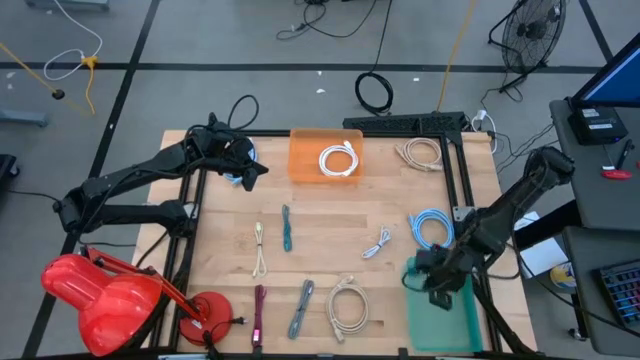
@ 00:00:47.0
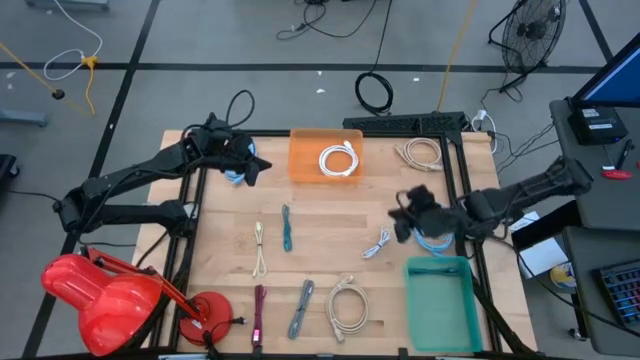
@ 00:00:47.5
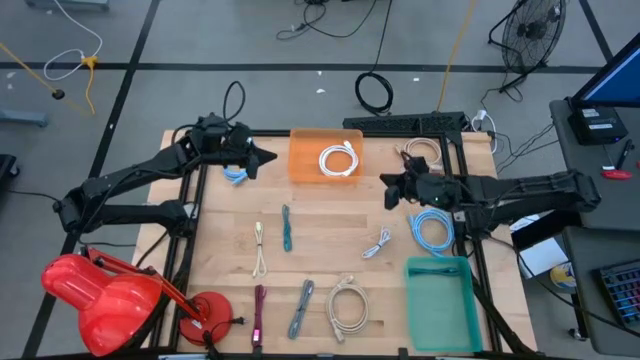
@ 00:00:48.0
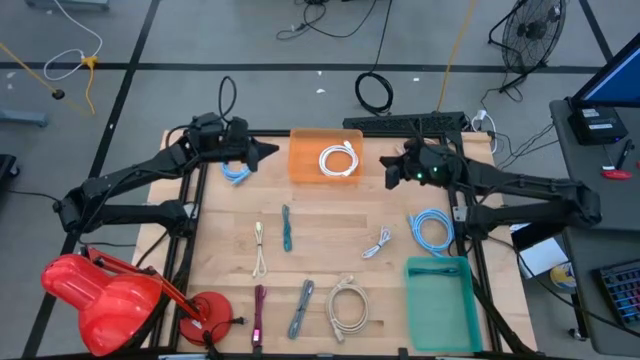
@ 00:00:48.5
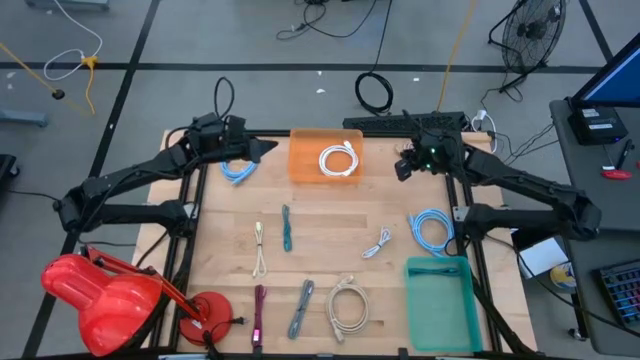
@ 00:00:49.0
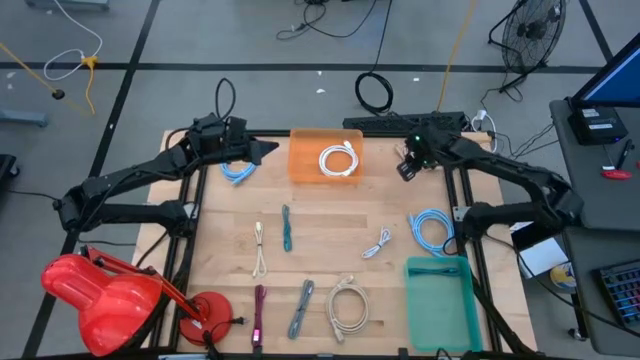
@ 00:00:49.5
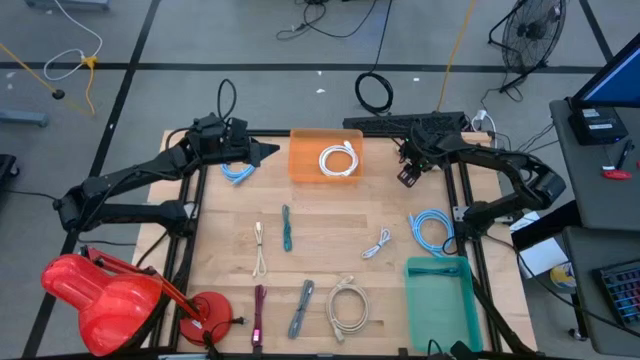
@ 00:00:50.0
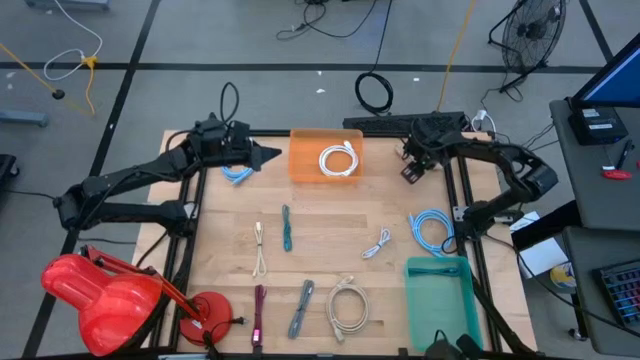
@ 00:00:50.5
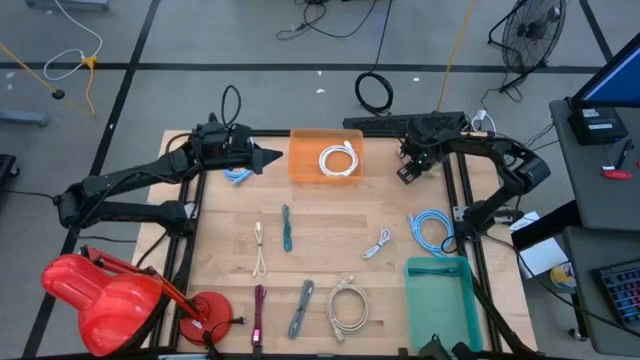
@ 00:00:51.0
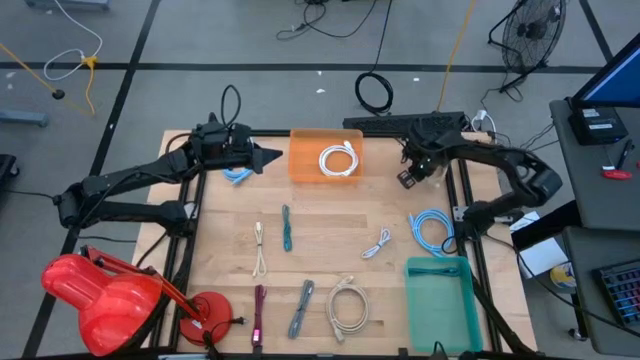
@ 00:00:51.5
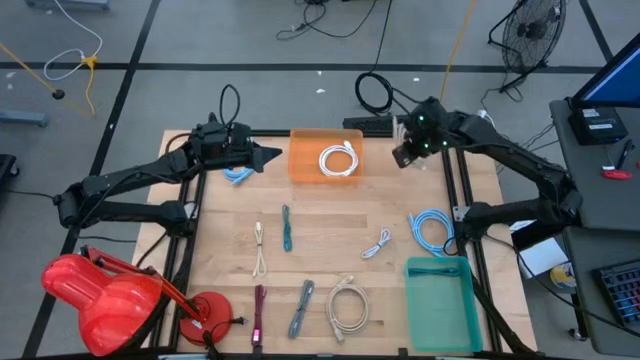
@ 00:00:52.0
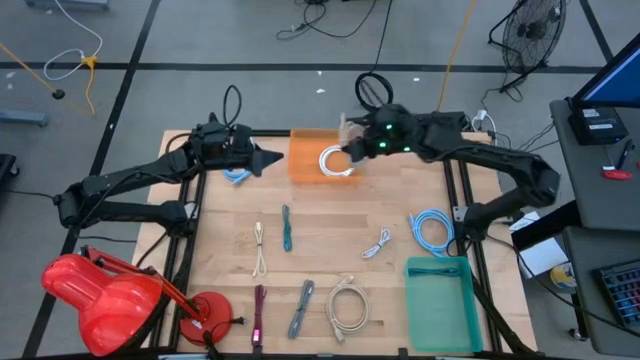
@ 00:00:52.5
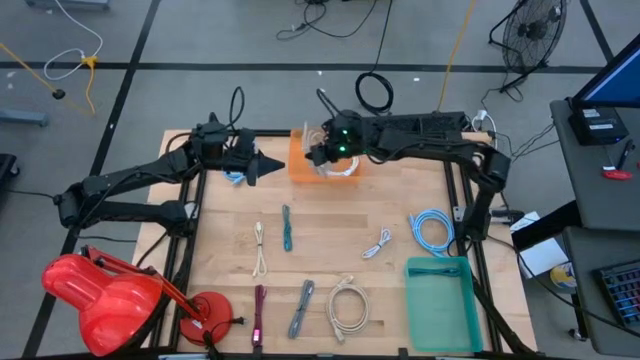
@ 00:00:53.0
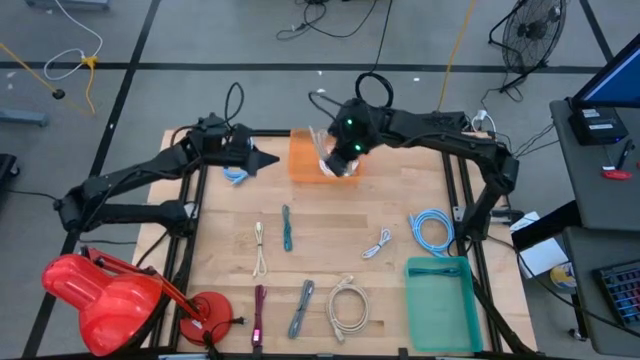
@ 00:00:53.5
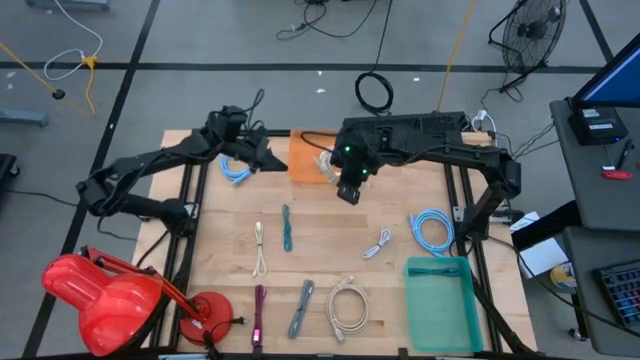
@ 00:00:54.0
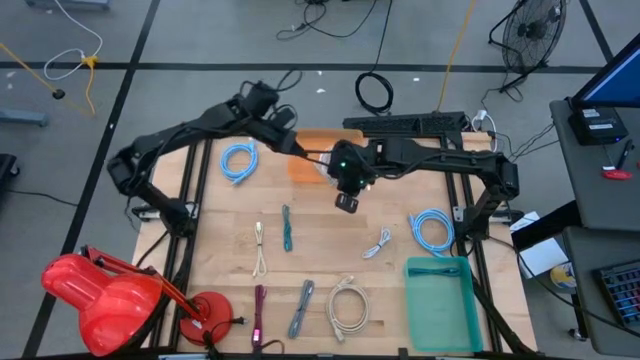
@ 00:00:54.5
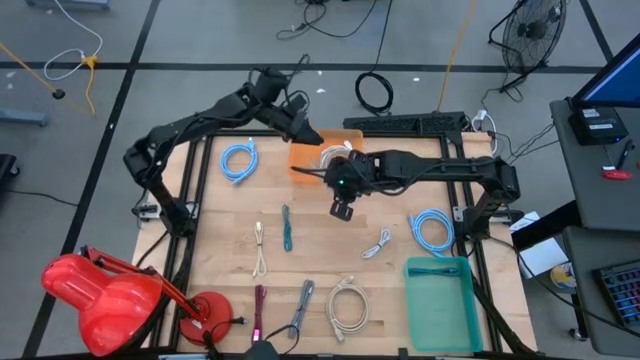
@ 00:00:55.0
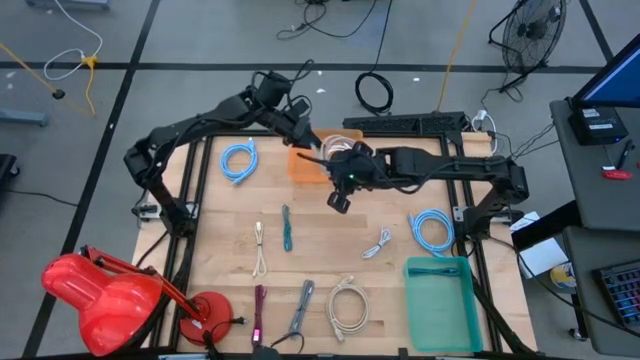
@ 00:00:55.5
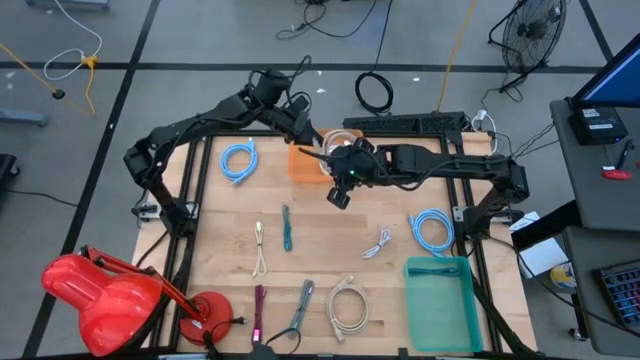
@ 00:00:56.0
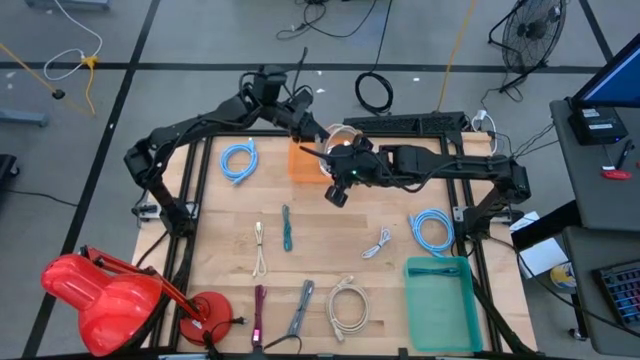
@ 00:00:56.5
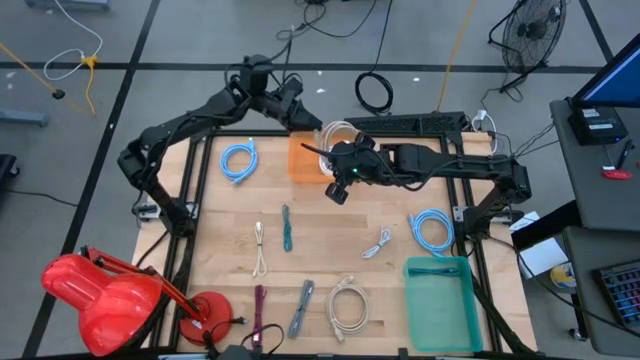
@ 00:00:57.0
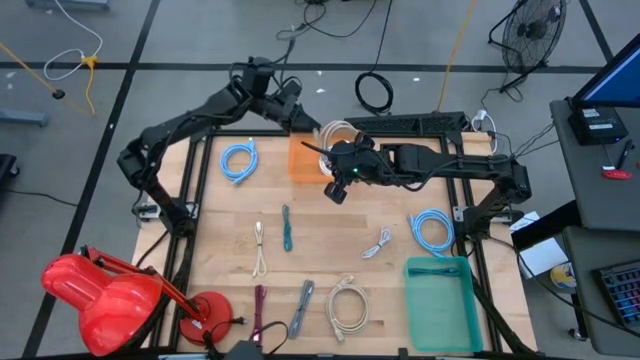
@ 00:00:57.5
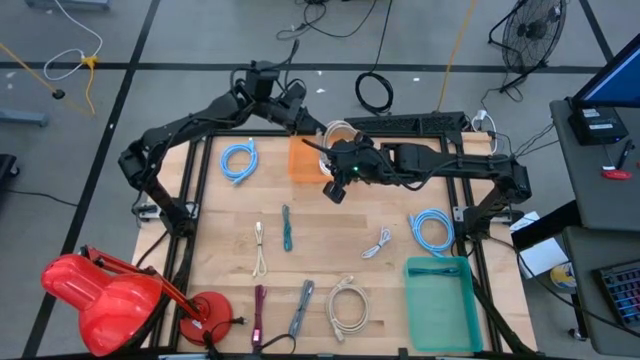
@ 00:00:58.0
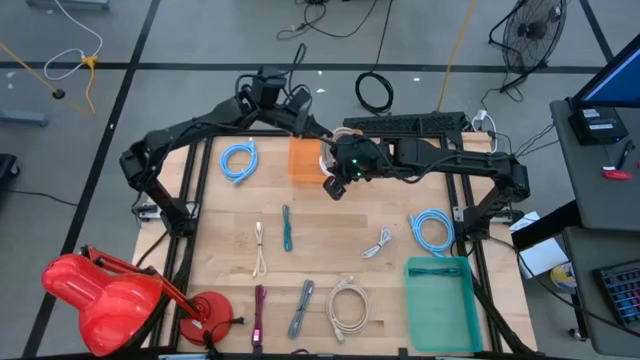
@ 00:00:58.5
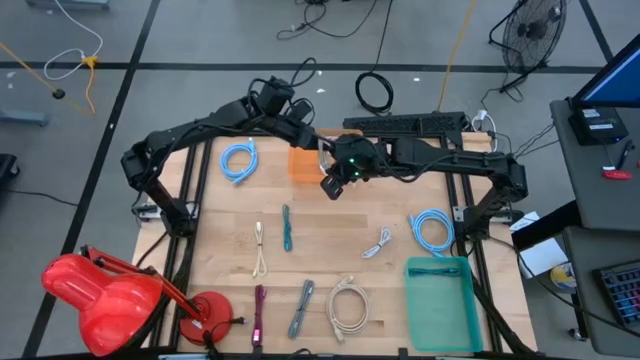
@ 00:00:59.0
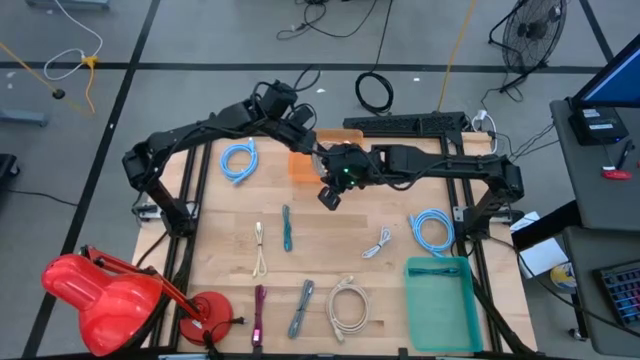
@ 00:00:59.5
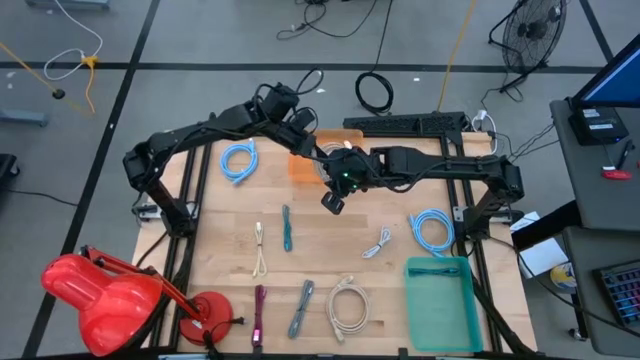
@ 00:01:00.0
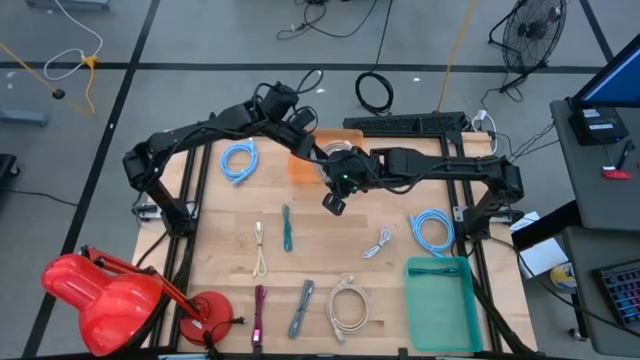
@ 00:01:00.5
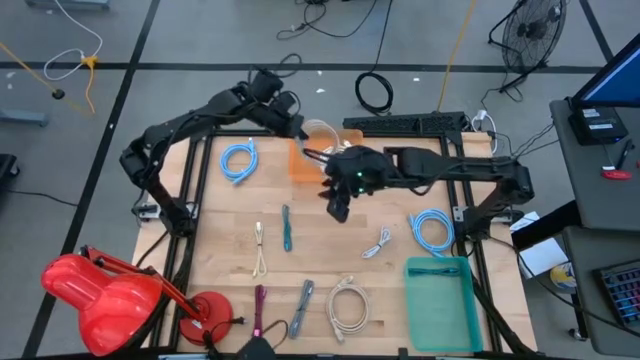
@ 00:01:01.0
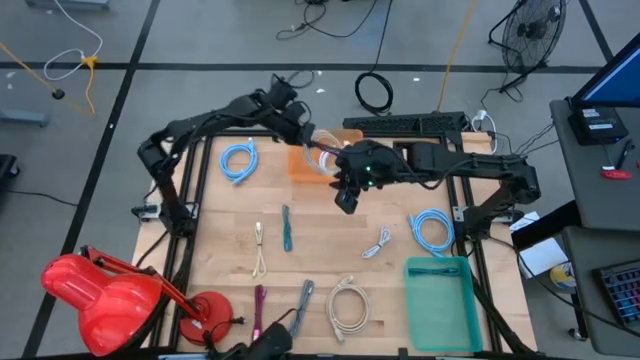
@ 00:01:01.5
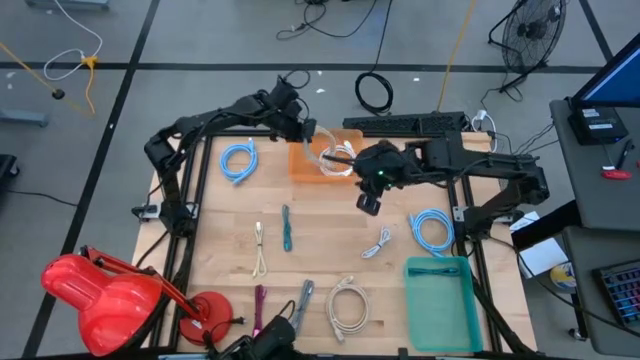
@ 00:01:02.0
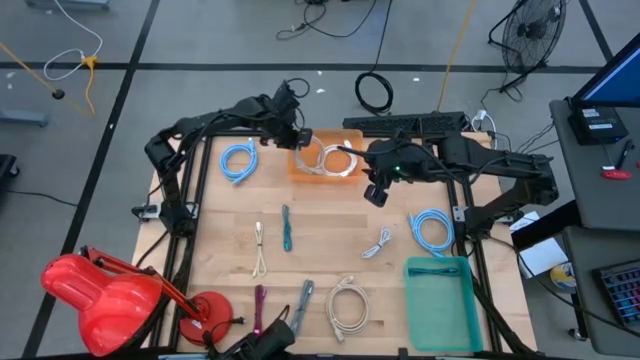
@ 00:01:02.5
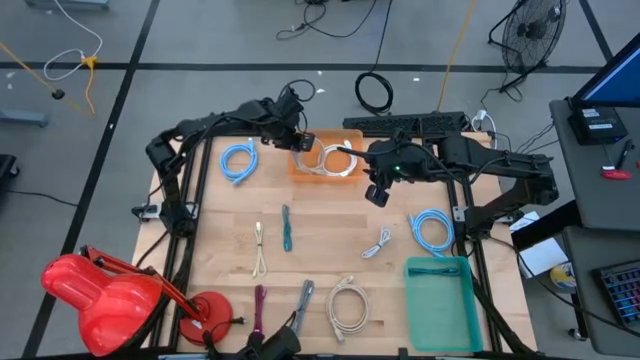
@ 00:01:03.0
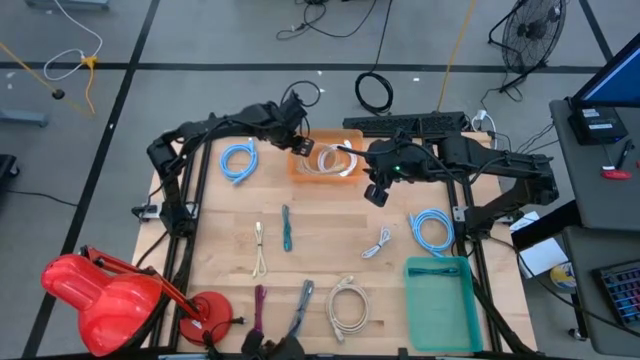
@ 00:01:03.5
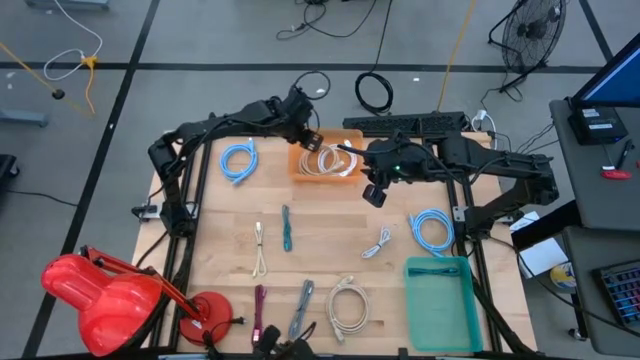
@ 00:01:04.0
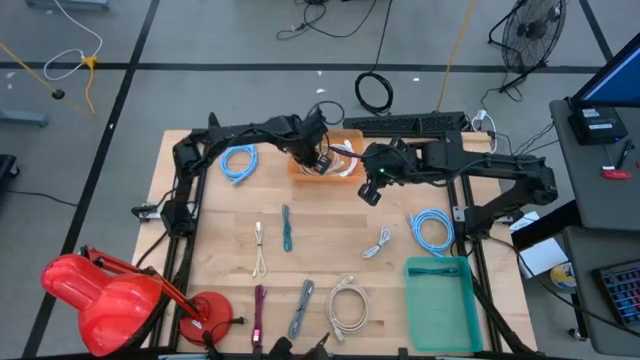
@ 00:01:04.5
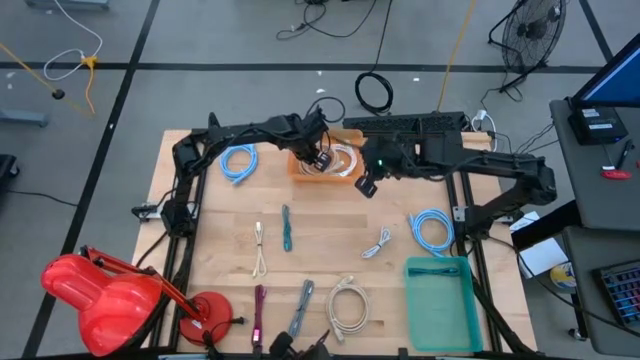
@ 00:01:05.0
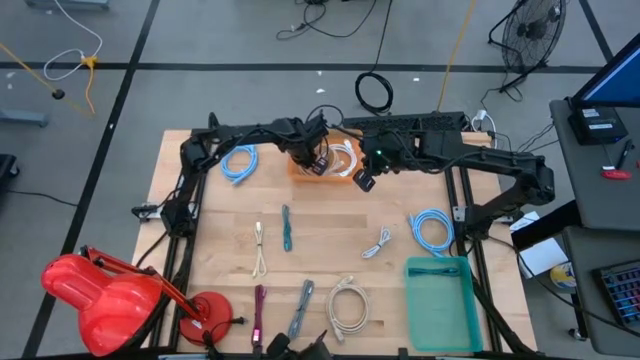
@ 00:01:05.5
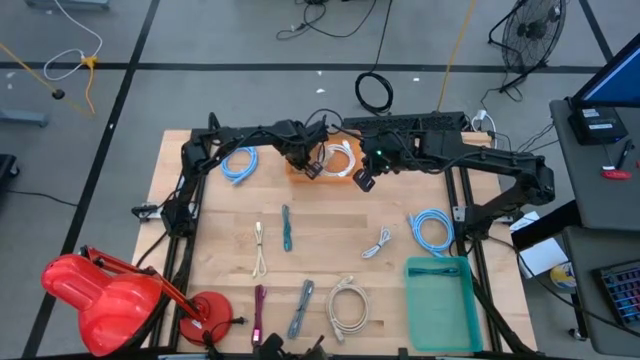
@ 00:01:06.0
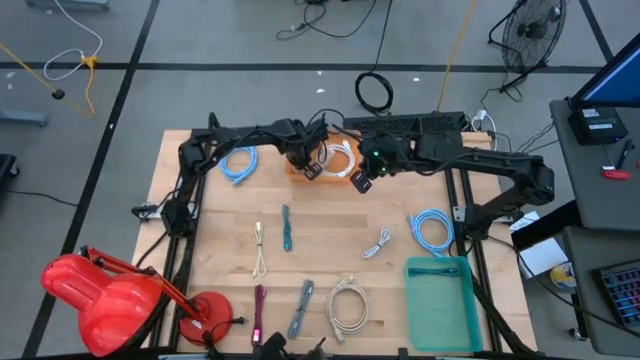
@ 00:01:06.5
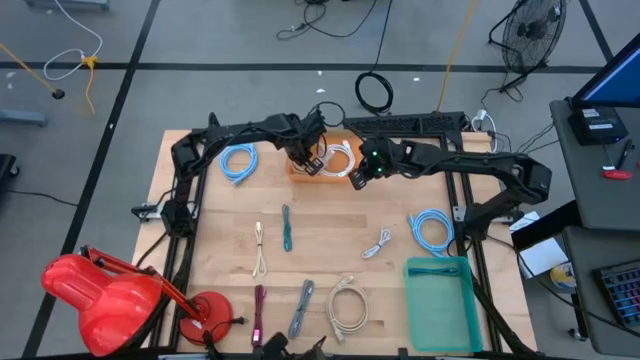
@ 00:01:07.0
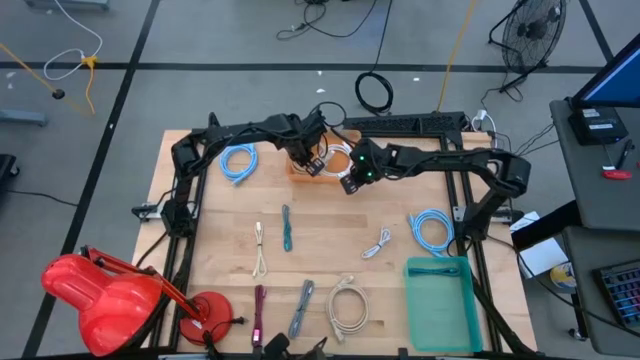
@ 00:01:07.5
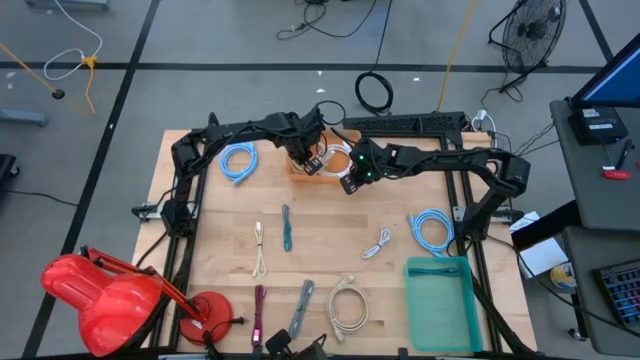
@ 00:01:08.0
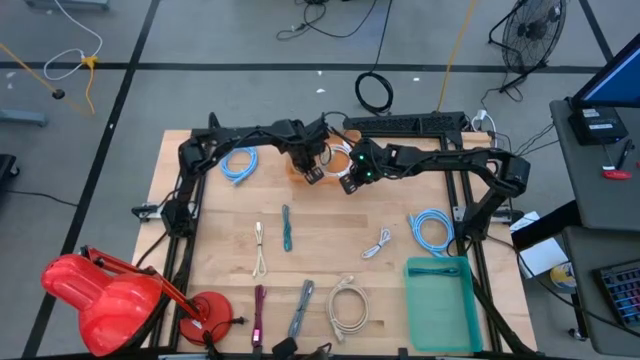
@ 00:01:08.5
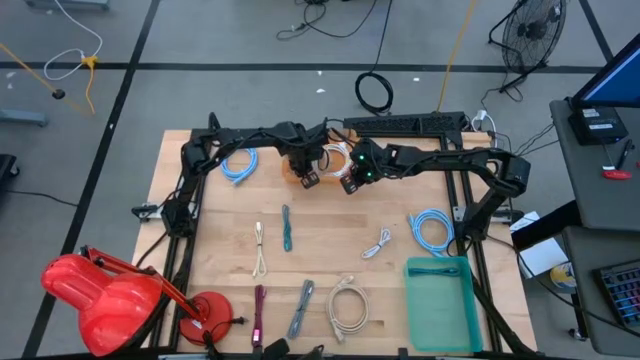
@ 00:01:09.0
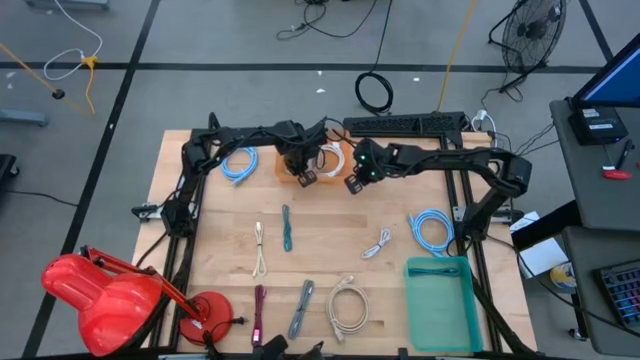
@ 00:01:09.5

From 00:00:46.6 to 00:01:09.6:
Task: Pick & Place USB Port
Put the large top brown charger cable into the orange bin
